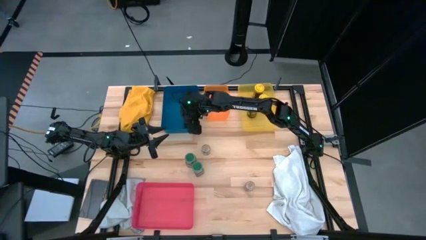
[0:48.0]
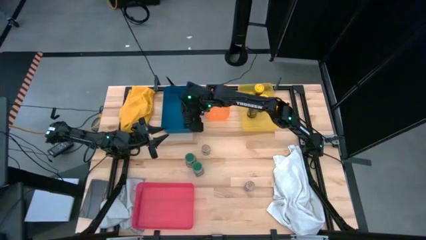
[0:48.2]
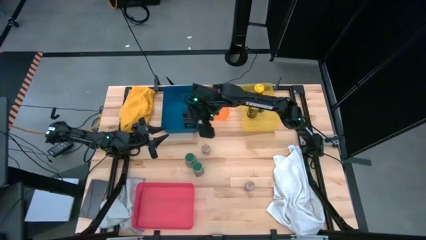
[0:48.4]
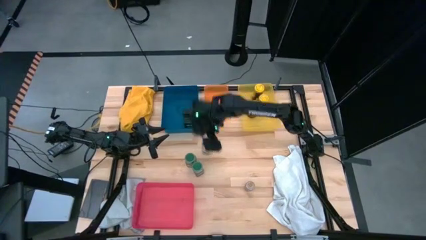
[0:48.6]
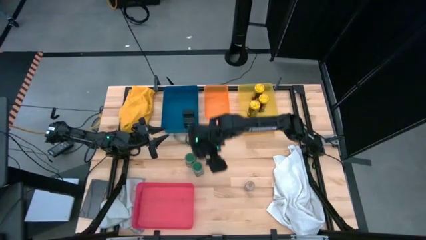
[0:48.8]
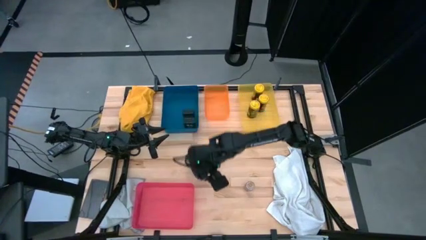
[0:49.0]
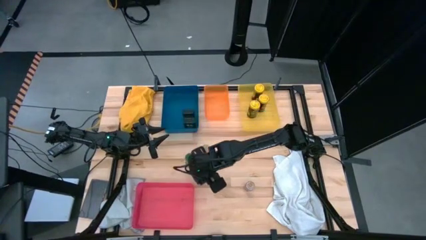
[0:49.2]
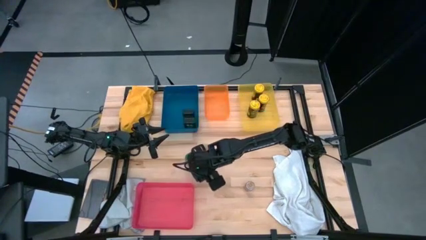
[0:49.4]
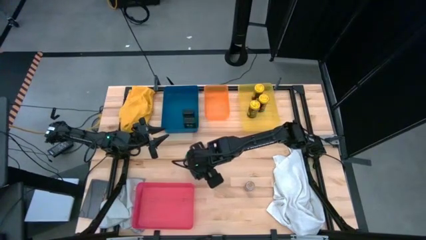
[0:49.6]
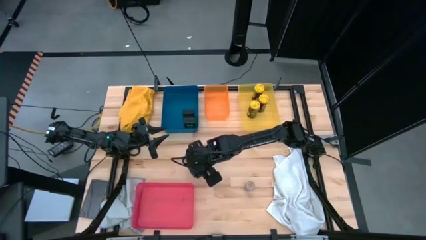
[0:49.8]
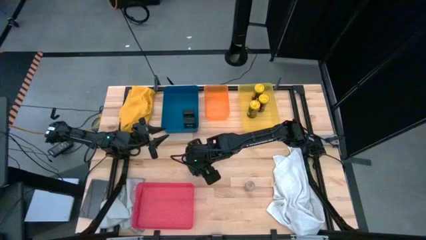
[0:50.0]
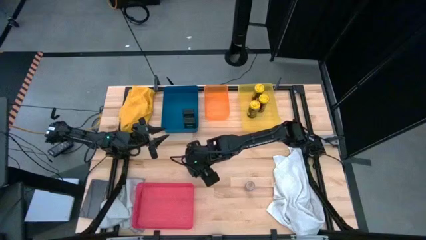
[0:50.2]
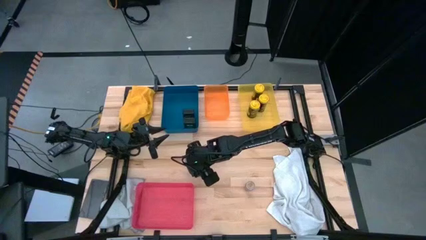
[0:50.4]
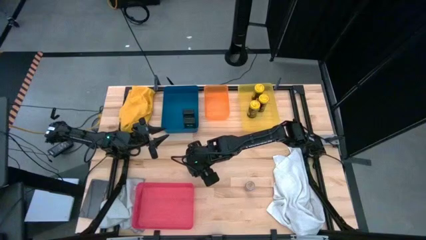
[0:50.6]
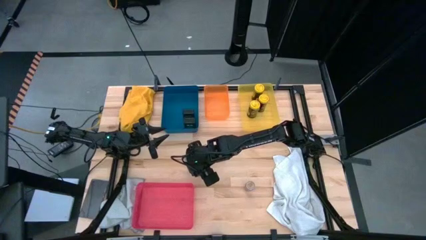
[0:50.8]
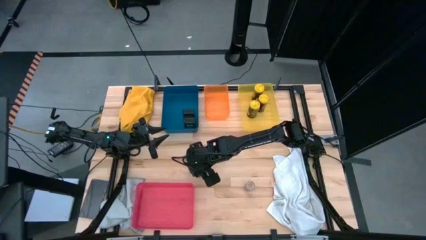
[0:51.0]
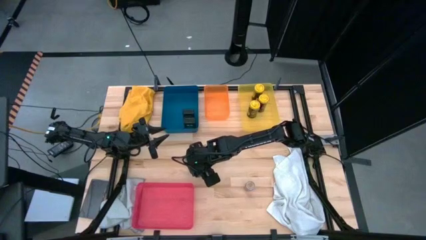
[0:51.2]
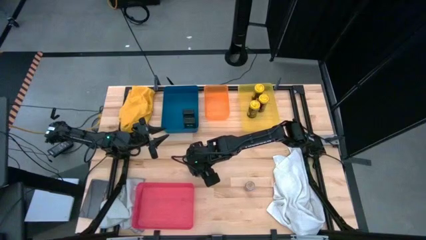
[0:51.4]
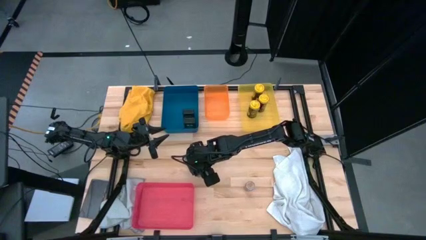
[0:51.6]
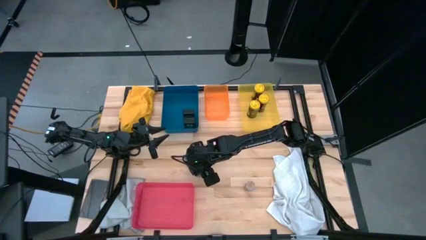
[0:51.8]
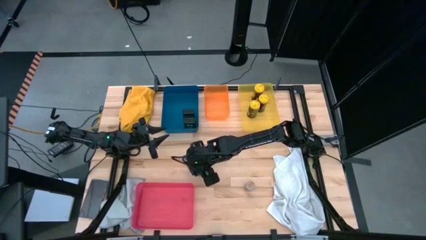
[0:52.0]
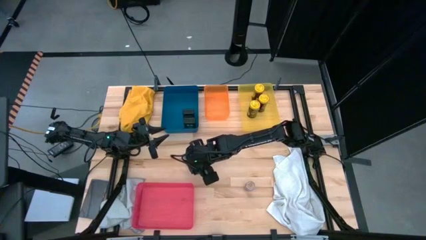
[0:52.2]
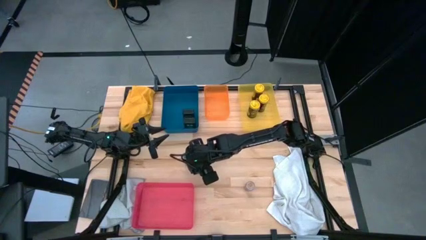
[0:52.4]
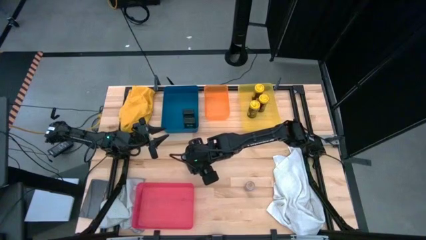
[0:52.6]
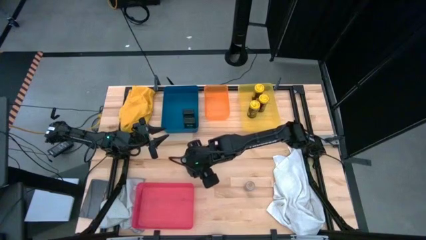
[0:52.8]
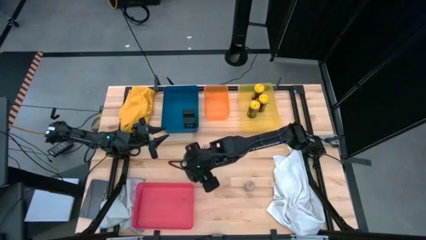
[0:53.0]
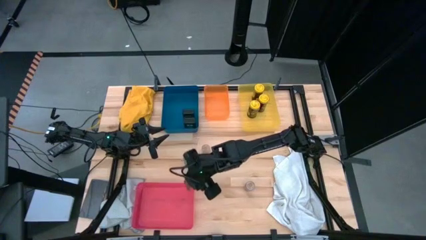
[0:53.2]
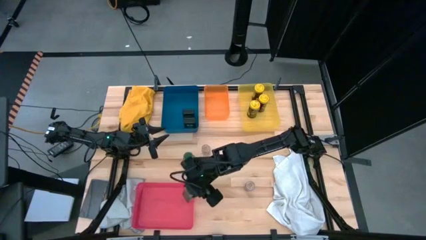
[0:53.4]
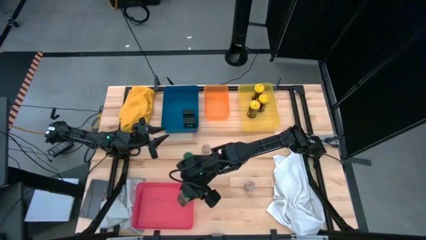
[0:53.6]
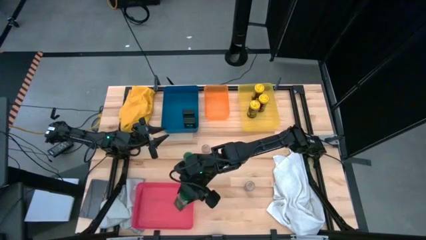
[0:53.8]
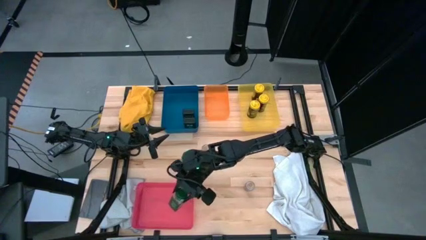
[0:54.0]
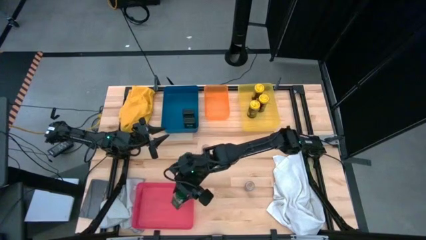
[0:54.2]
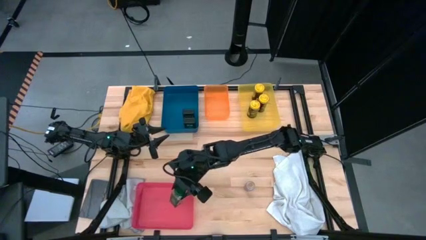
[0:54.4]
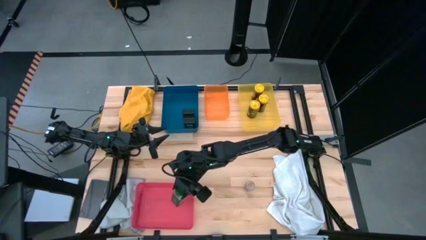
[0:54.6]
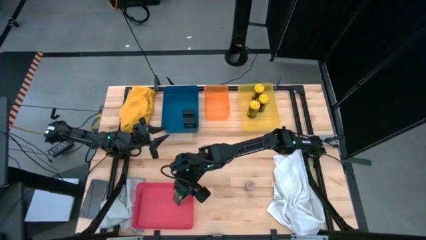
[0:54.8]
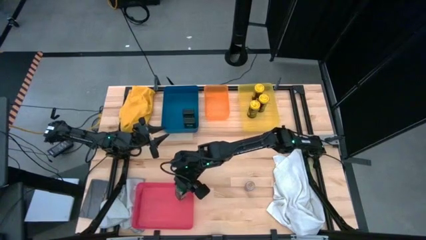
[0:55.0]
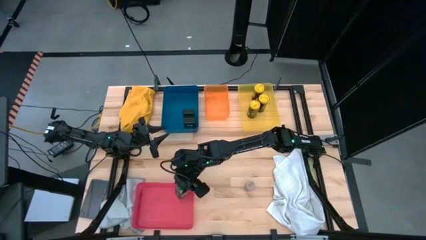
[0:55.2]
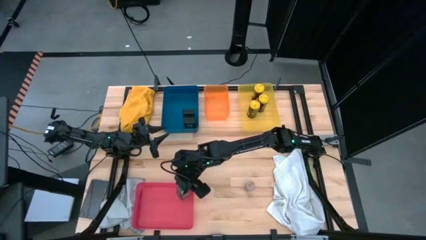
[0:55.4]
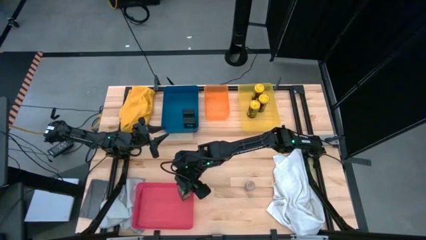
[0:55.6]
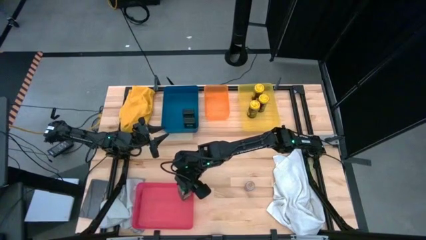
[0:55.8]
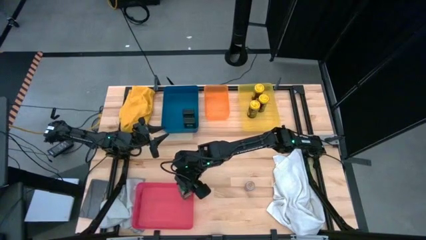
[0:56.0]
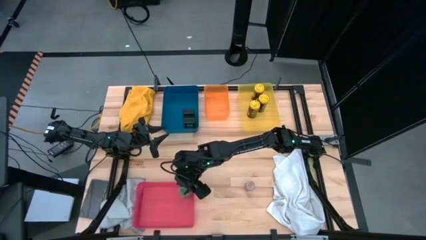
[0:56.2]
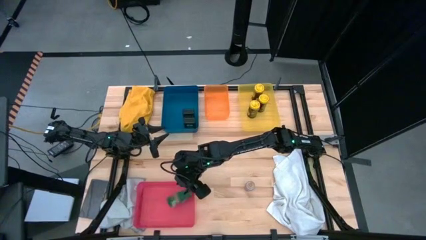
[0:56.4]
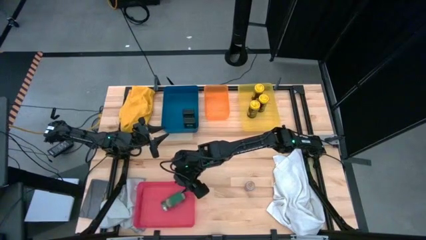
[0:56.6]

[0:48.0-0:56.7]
Task: Sort spices by type
Put the bottom green seasoning bottle into the red bin
